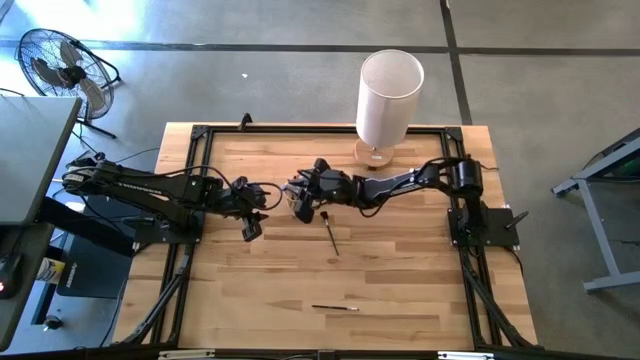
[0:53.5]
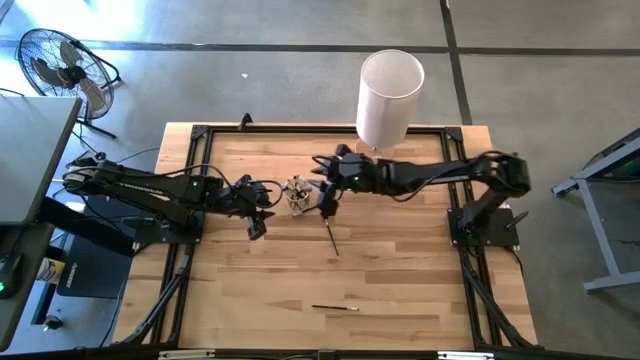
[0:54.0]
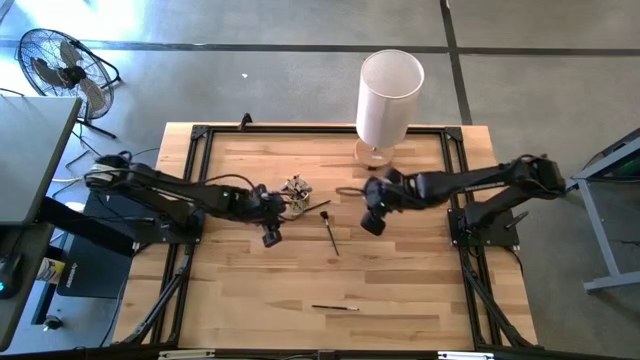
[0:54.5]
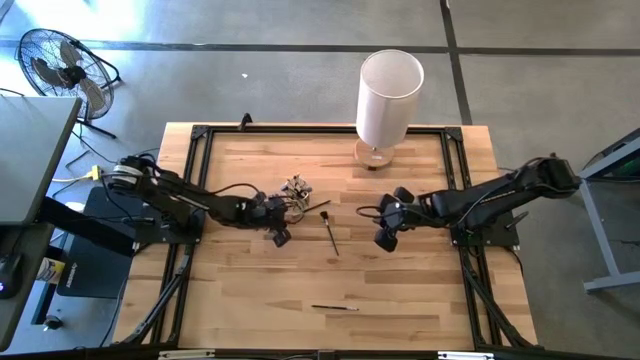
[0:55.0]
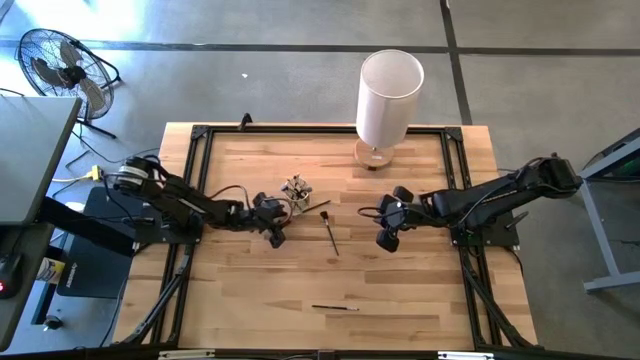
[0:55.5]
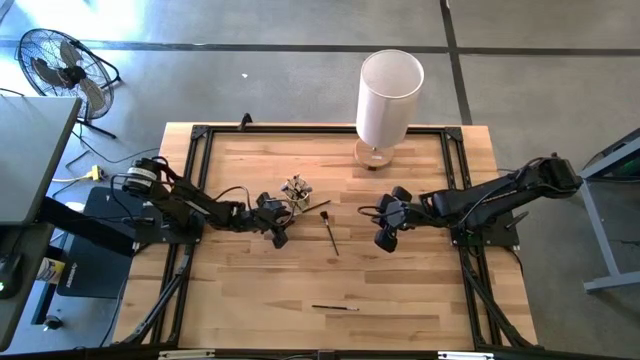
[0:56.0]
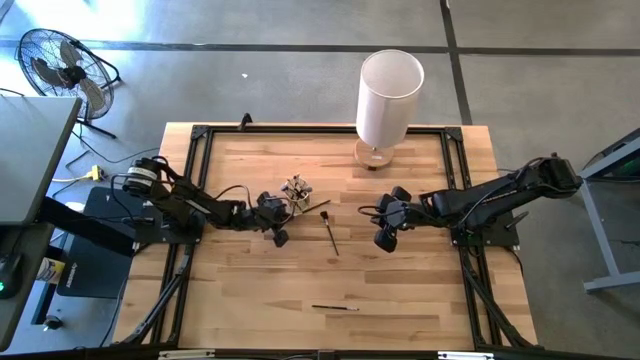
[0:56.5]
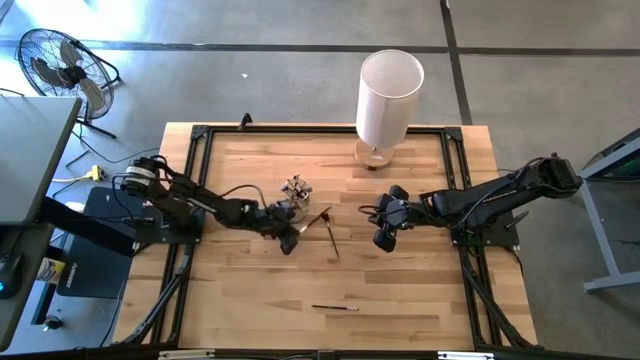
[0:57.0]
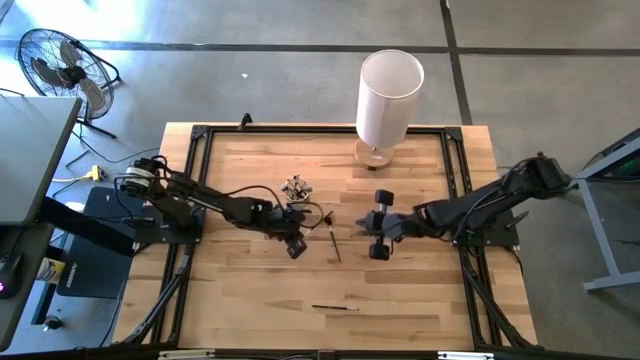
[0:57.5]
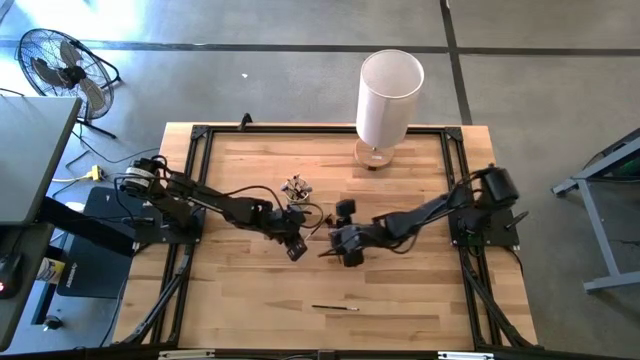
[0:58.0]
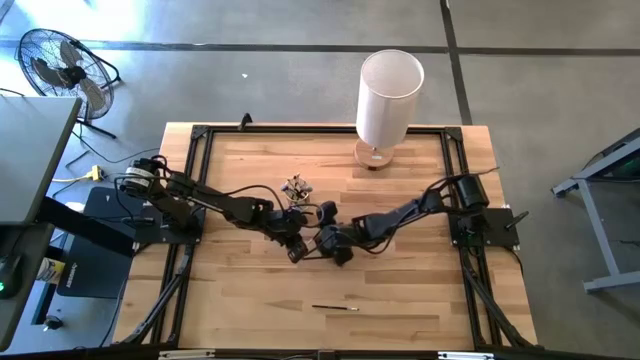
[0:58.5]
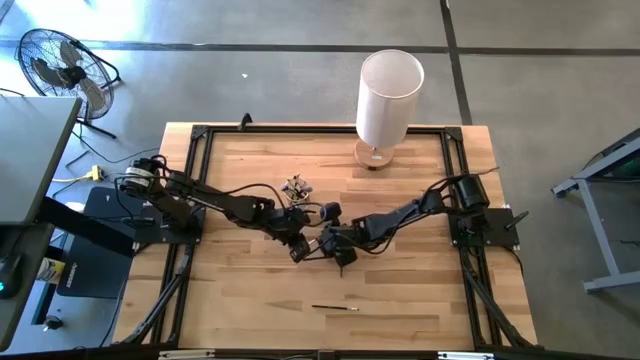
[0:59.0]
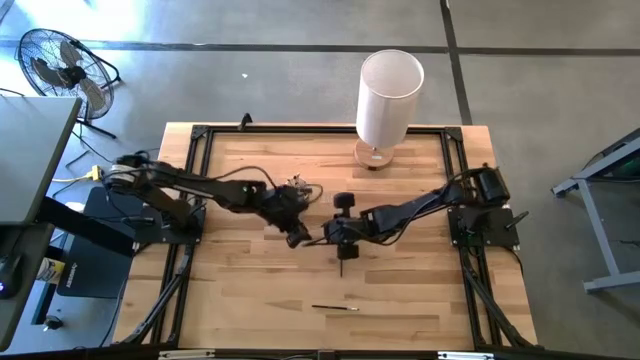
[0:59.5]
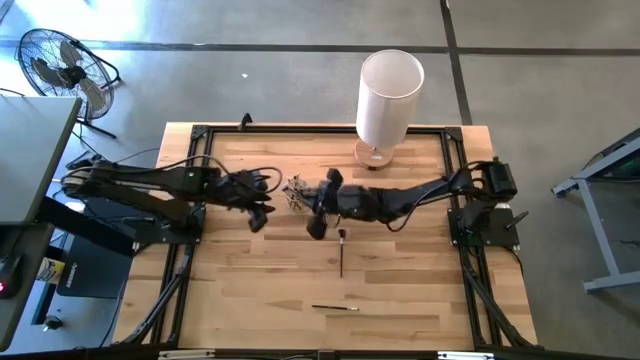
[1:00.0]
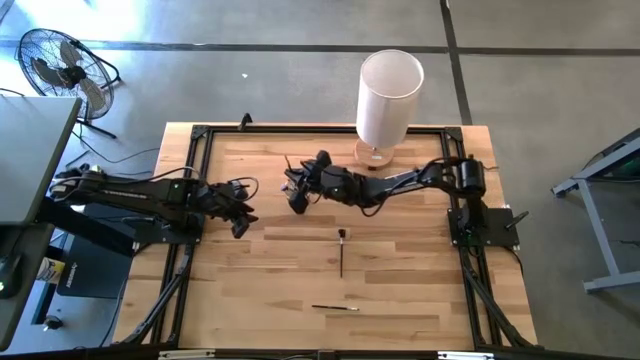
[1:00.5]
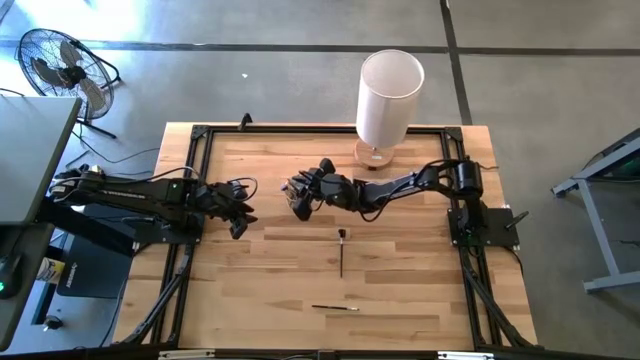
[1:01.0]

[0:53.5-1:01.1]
Task: Put items in baskets/containers
Put the black eyeshadow brush into the yellow holder

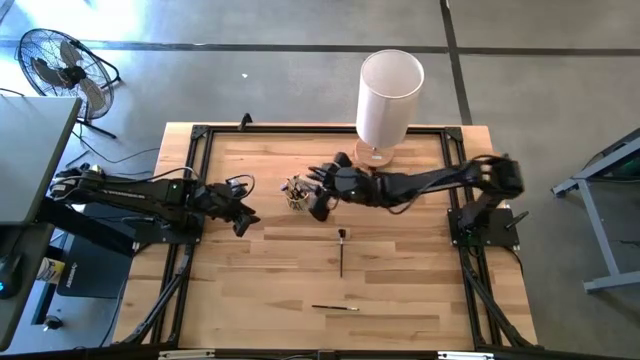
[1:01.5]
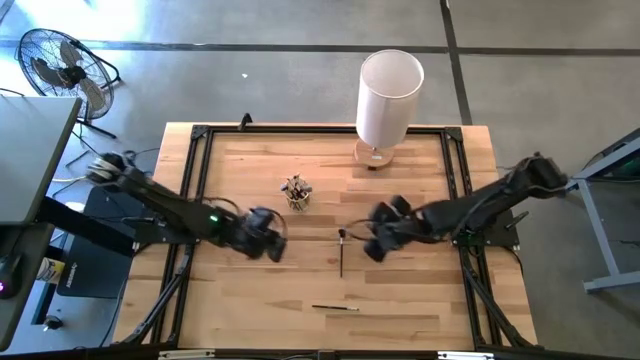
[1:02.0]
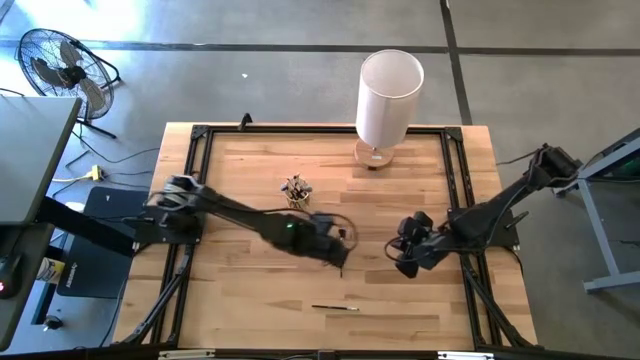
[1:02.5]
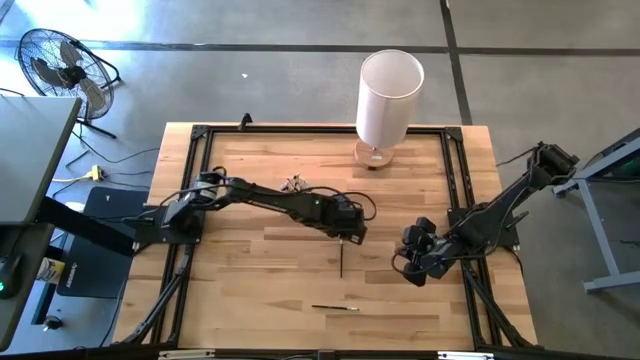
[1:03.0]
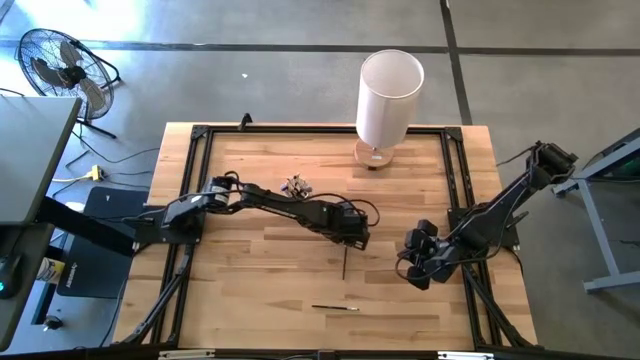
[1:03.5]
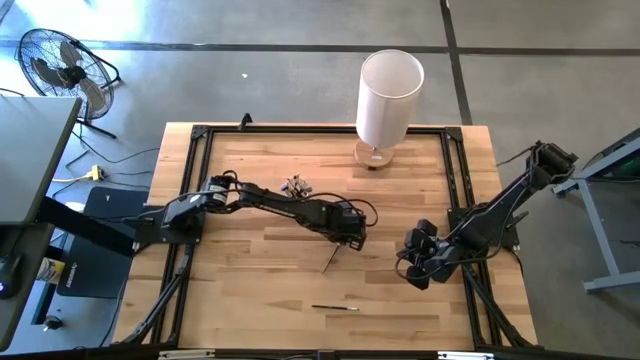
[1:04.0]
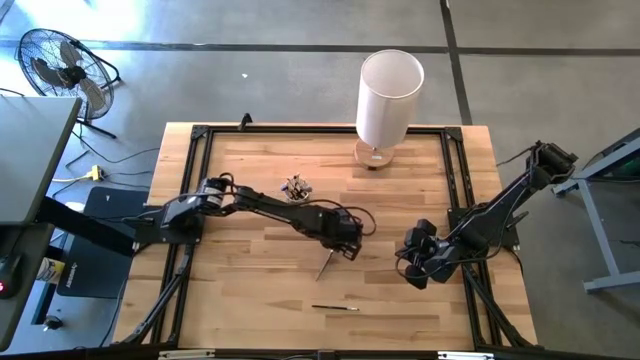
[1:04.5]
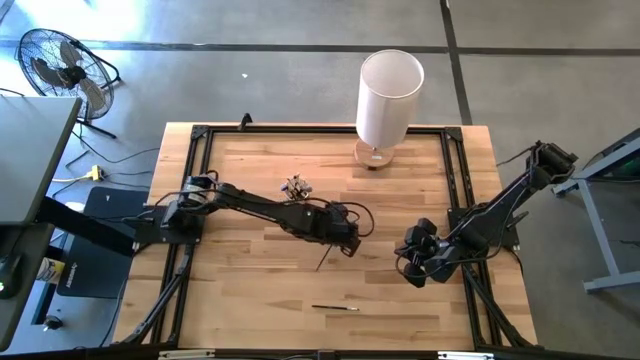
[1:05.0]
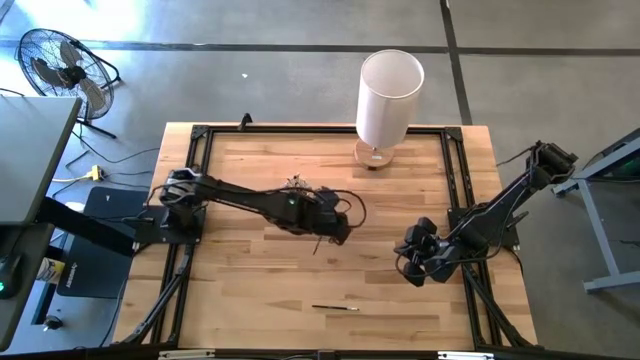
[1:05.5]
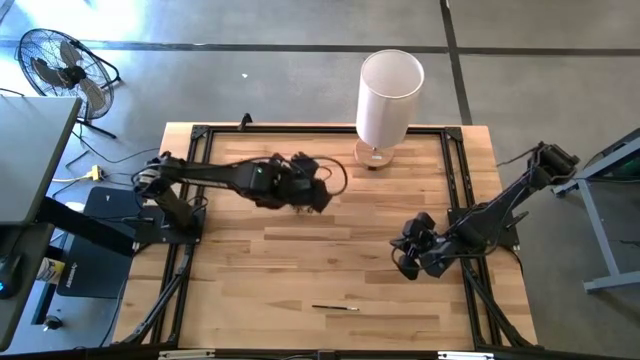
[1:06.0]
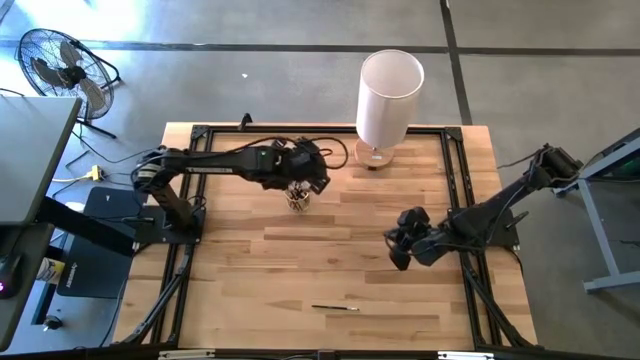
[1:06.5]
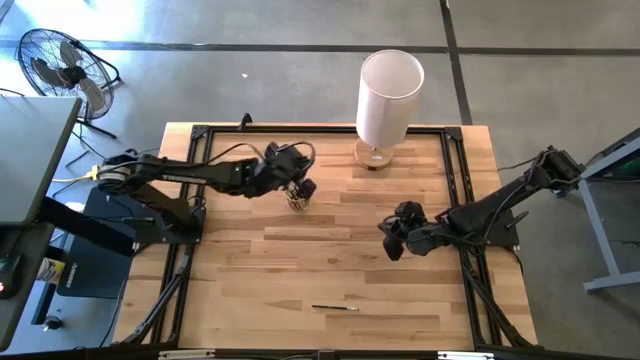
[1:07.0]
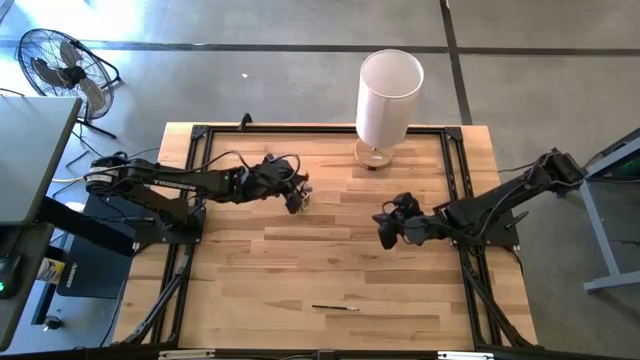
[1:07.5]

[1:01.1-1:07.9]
Put the black lash brush into the yellow holder

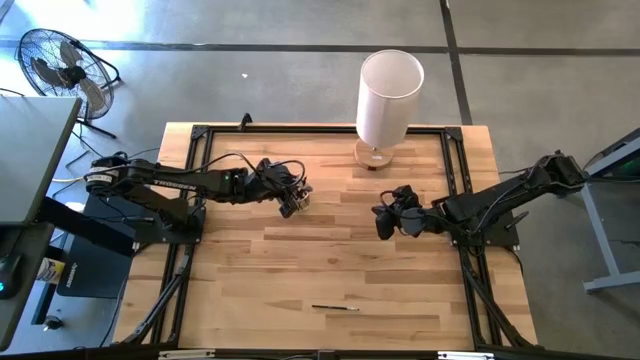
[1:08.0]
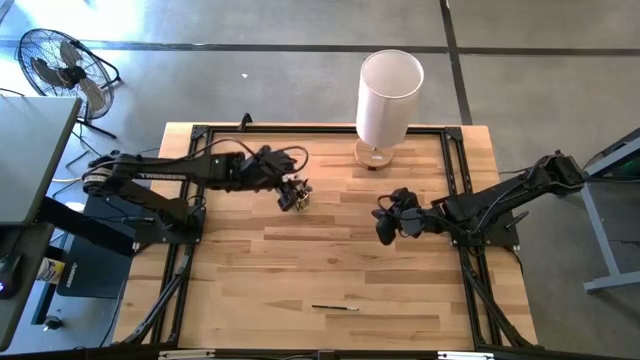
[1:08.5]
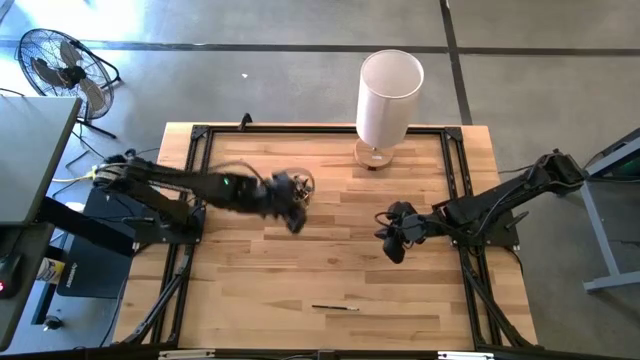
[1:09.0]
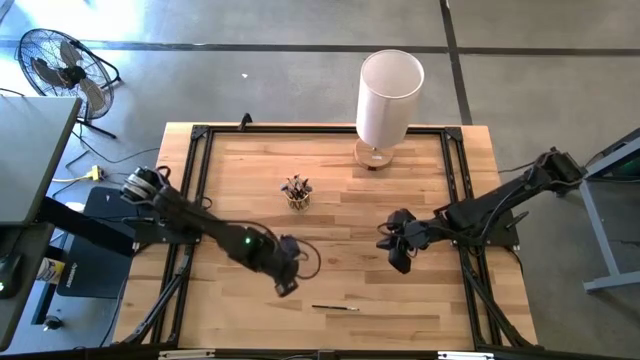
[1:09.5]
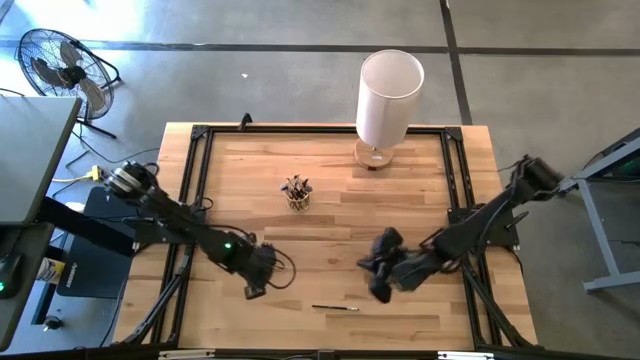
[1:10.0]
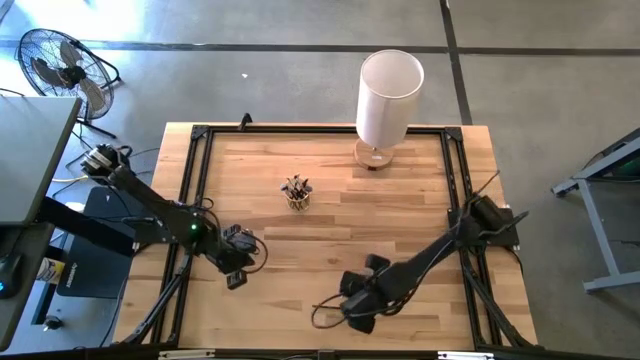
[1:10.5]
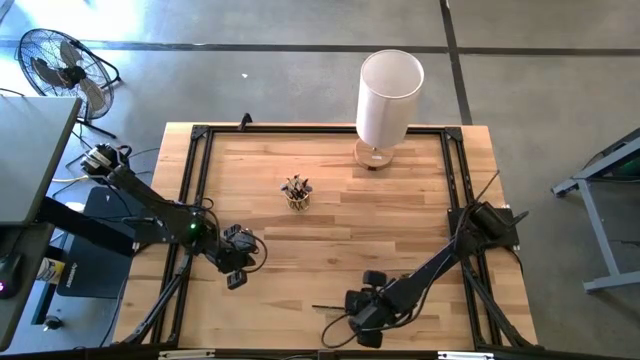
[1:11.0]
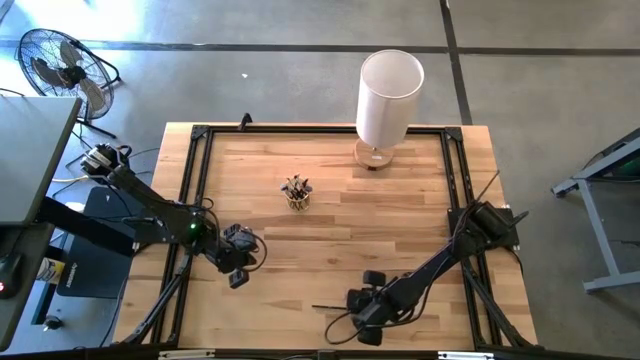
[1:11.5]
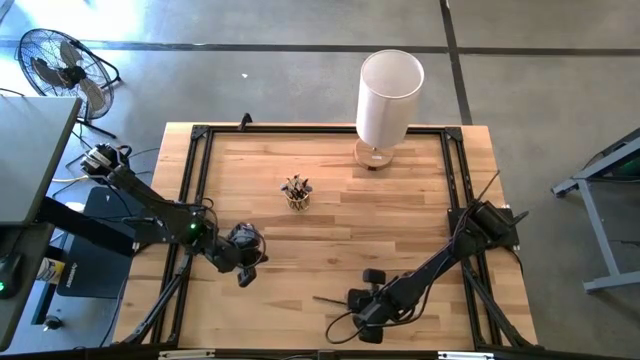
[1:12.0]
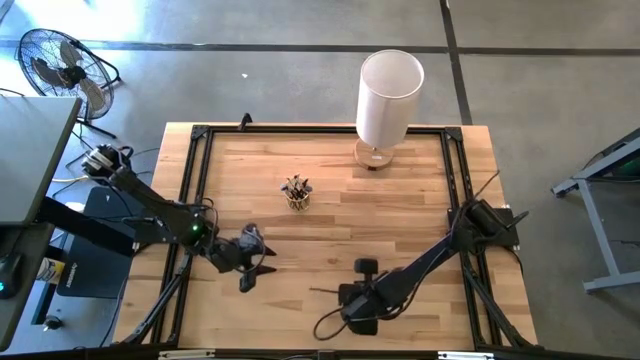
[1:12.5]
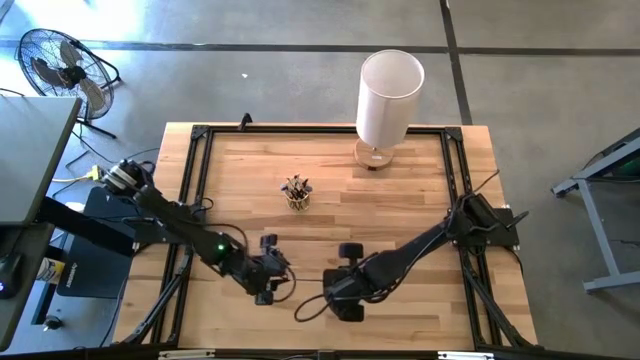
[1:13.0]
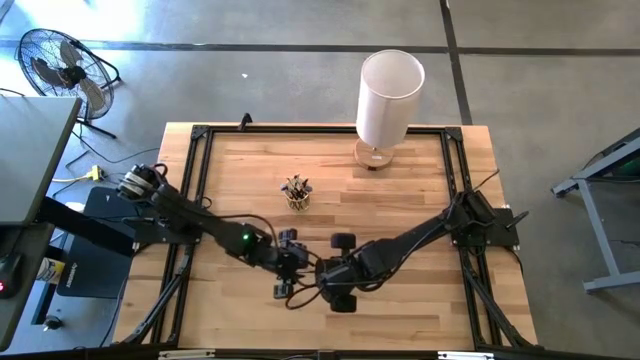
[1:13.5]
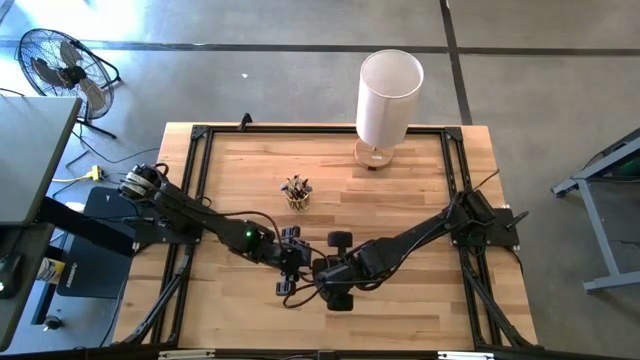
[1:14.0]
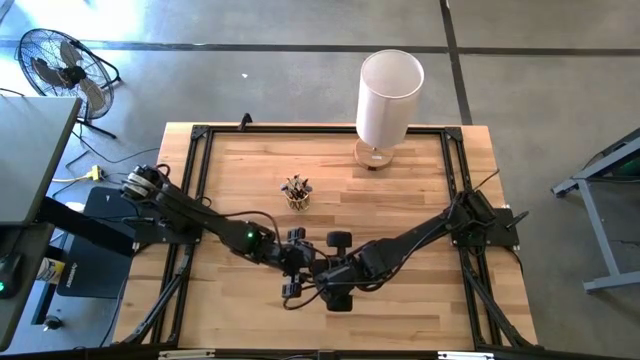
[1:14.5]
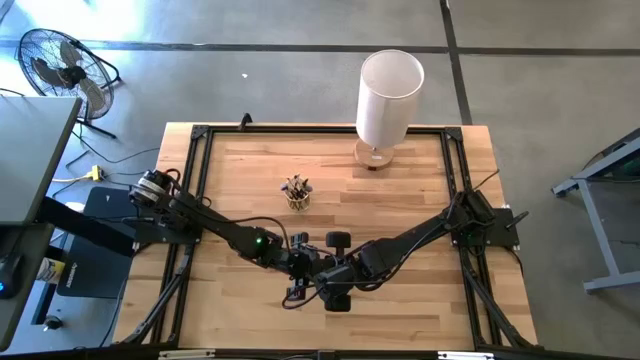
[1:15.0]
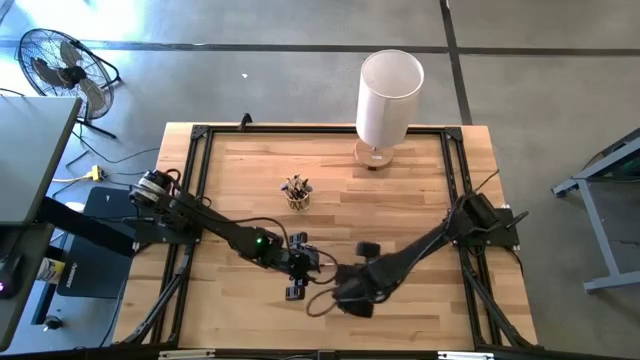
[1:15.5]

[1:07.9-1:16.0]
Put the black eyeshadow brush into the yellow holder
